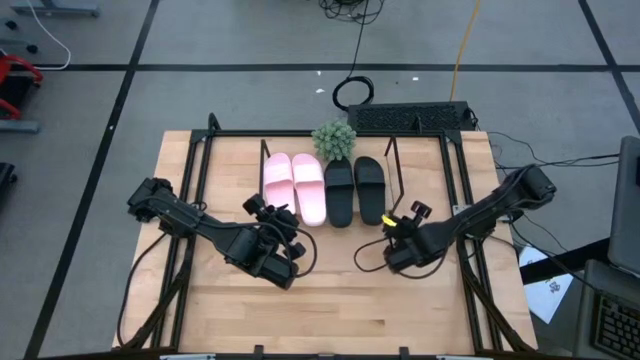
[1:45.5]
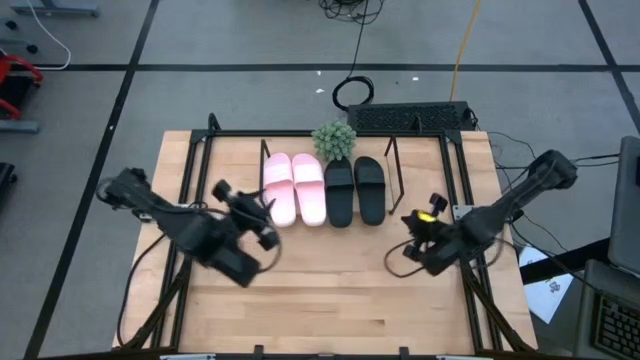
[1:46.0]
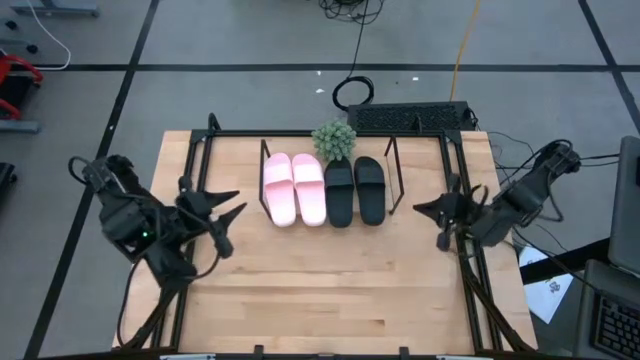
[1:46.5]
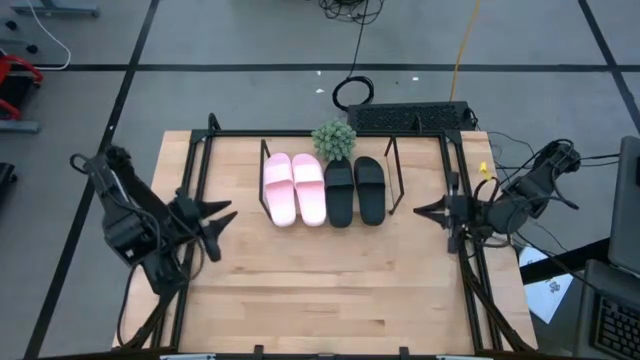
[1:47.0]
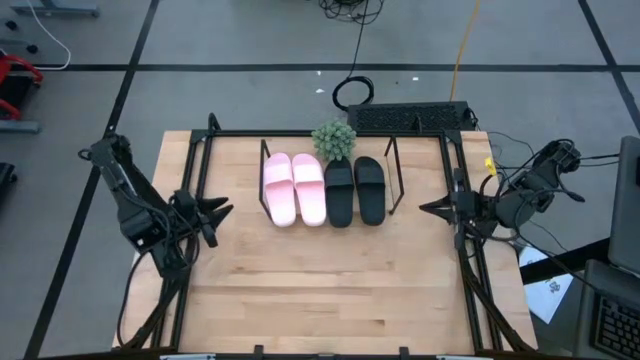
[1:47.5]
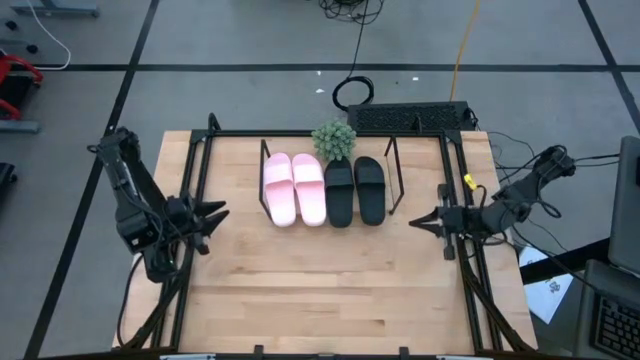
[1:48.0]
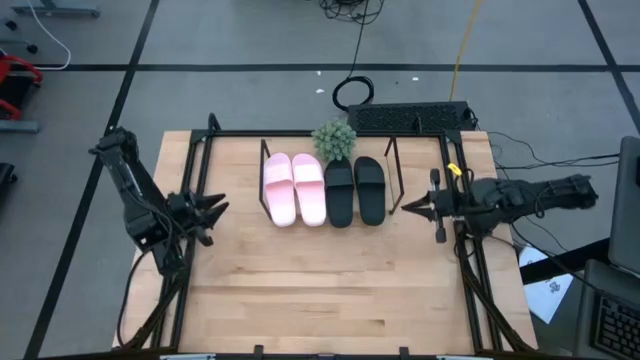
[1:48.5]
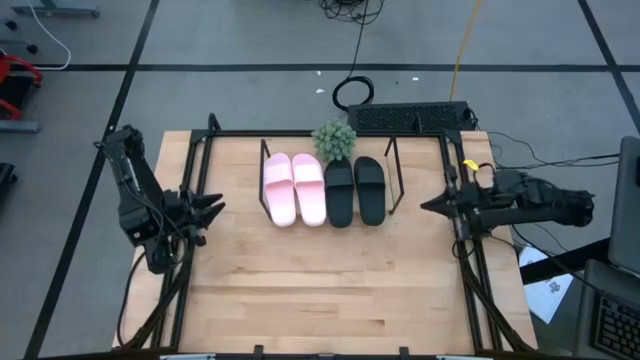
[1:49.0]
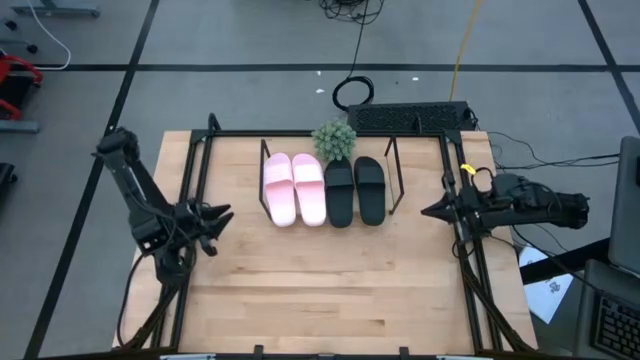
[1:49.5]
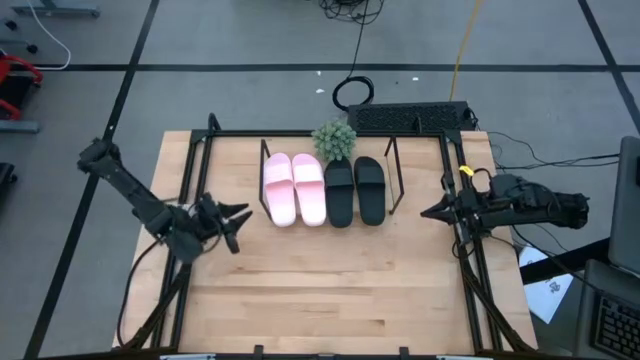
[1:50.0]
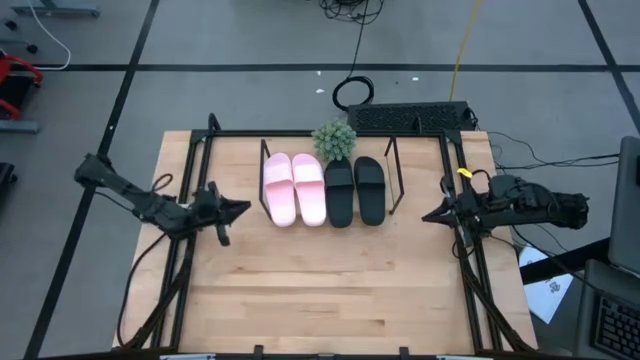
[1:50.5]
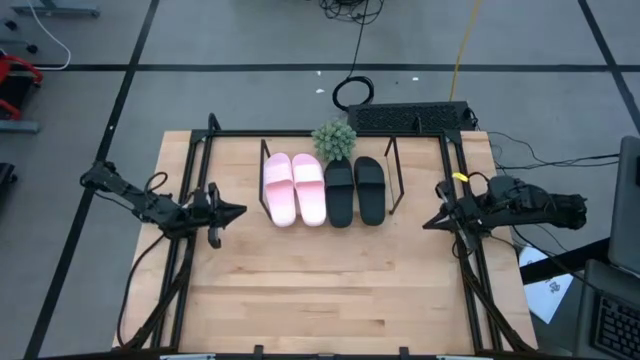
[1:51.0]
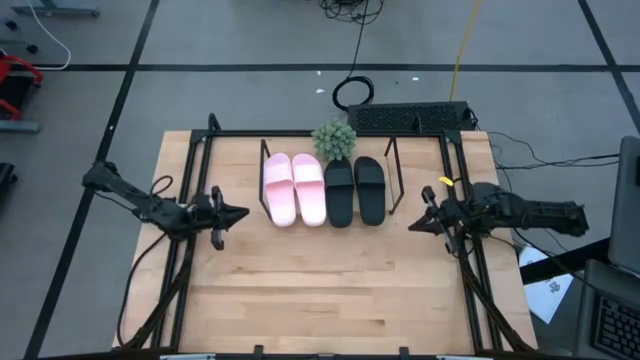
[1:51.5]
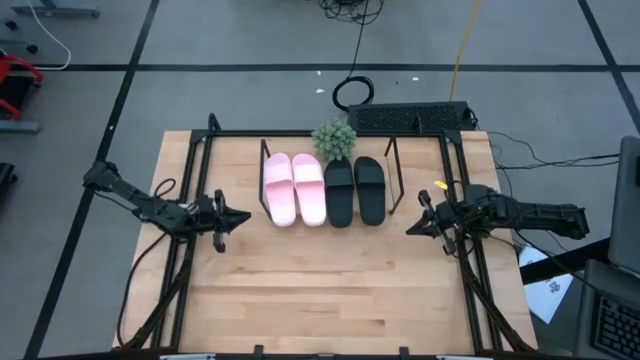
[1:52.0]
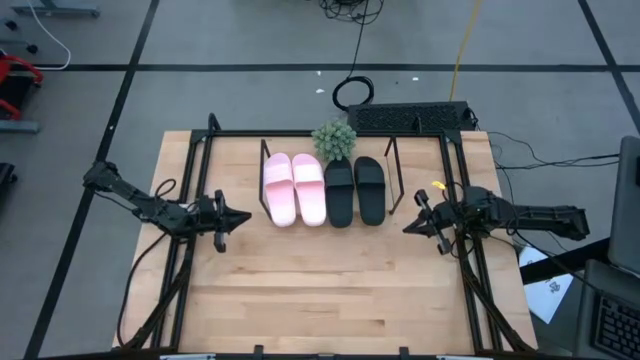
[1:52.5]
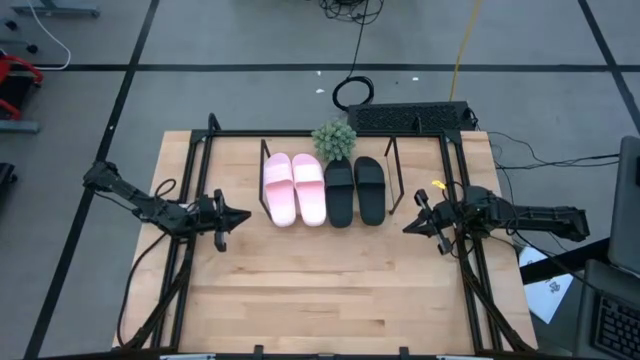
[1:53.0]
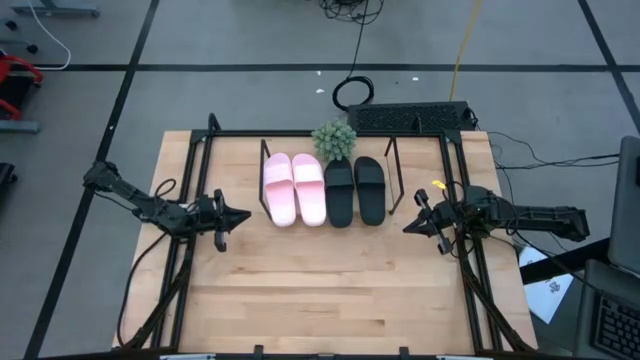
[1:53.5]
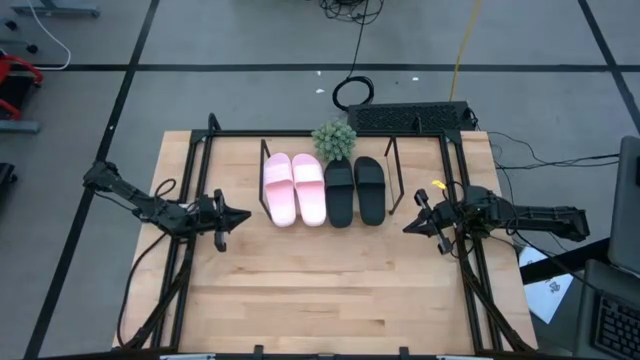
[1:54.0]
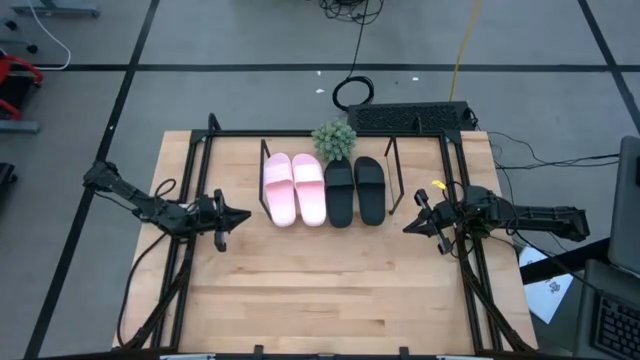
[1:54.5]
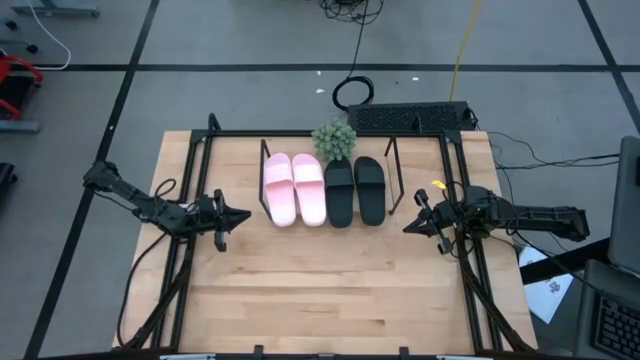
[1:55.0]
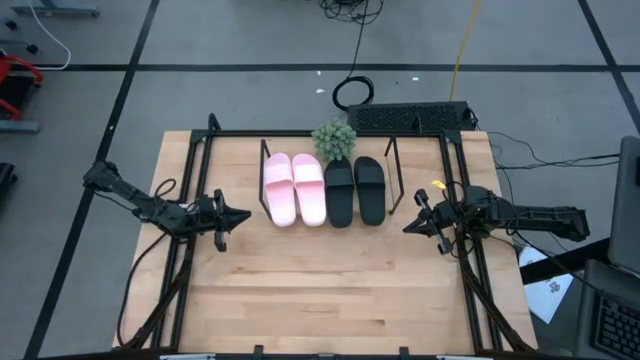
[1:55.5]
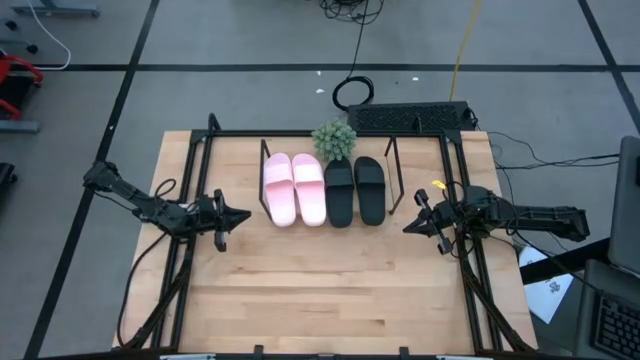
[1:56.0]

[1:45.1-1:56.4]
Task: Pick and place slides into the shelf
Return to Home Position
